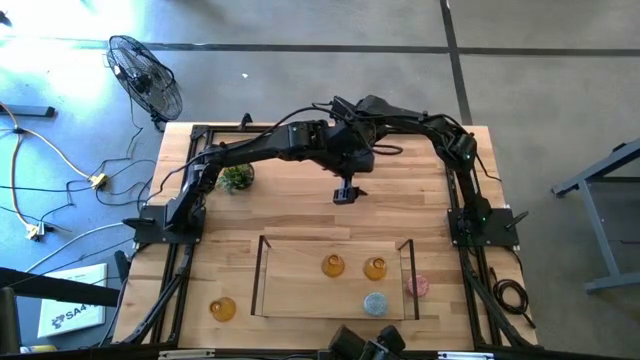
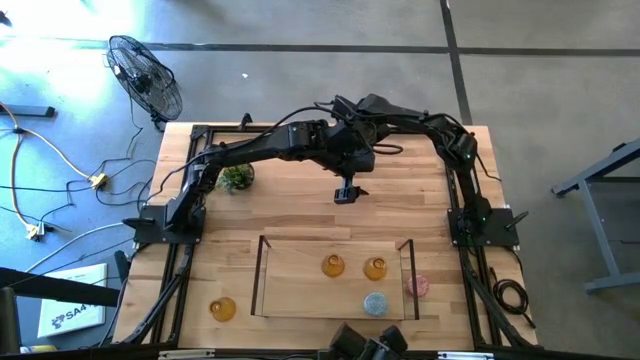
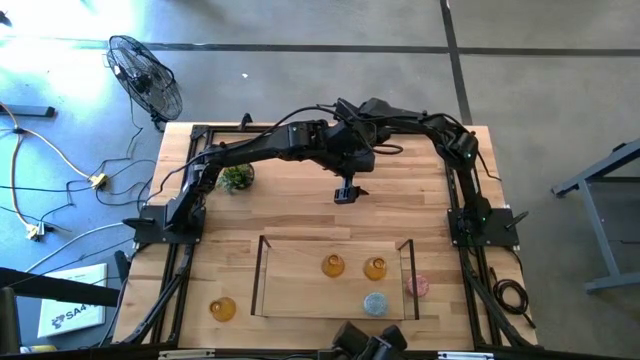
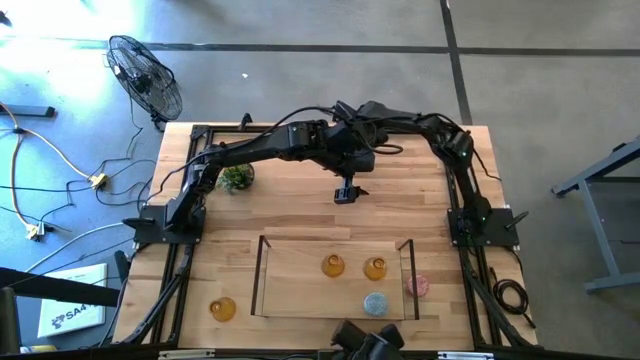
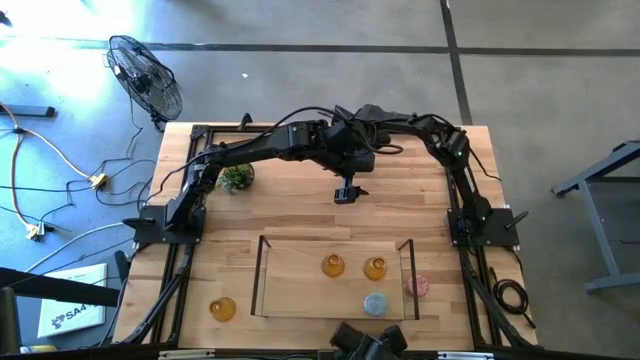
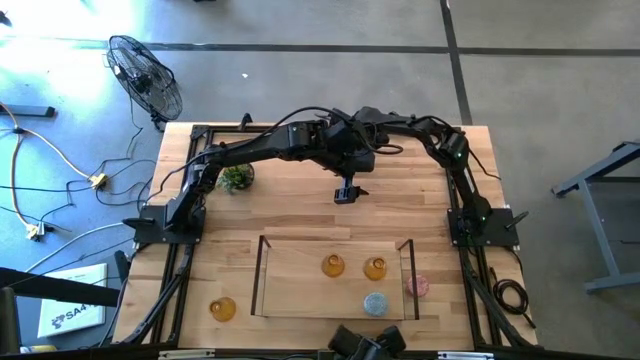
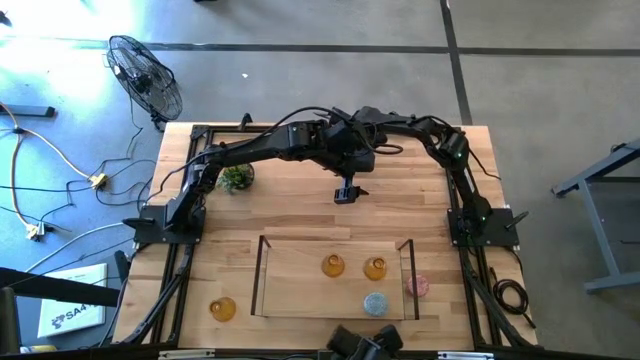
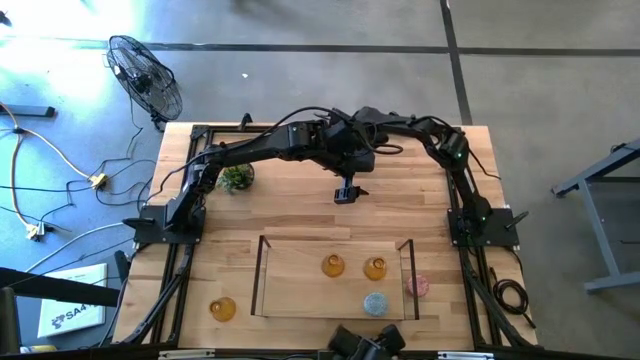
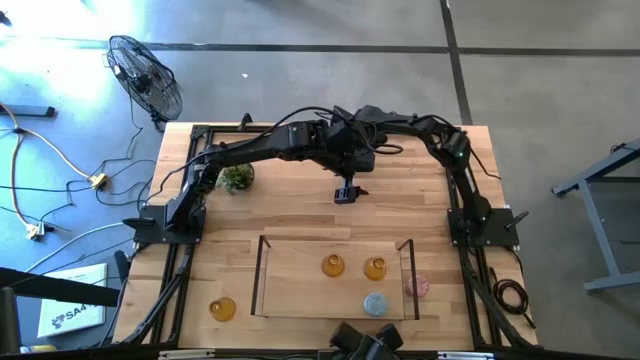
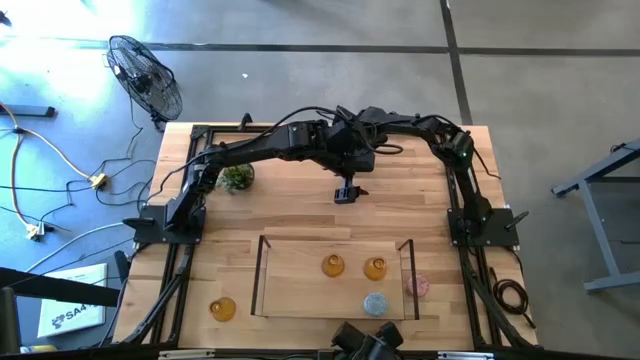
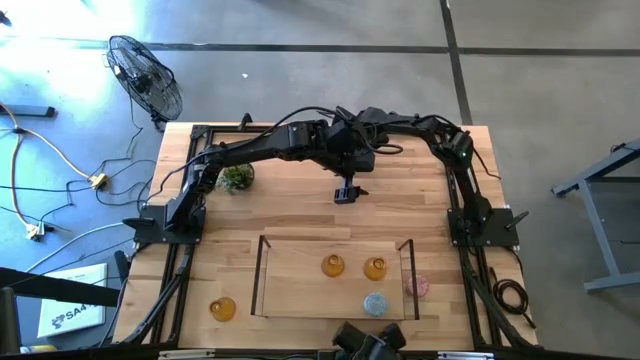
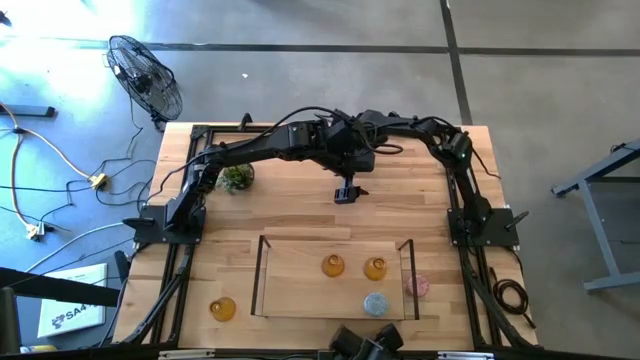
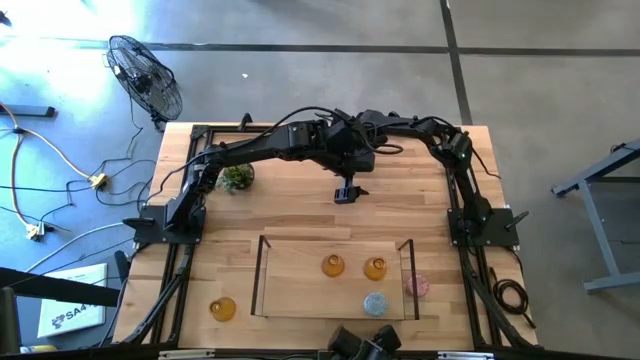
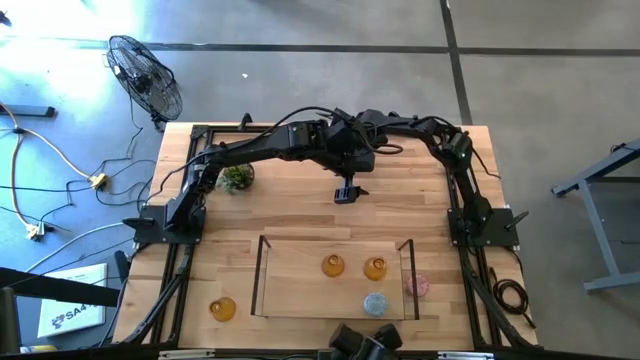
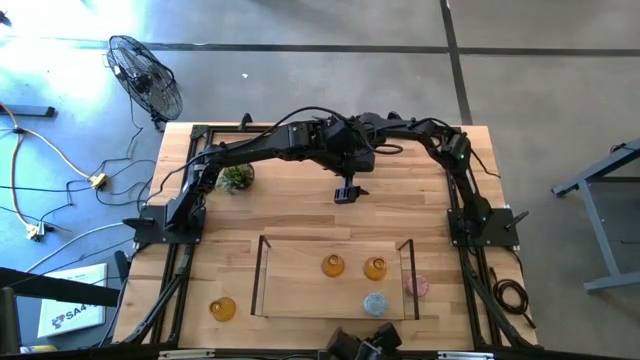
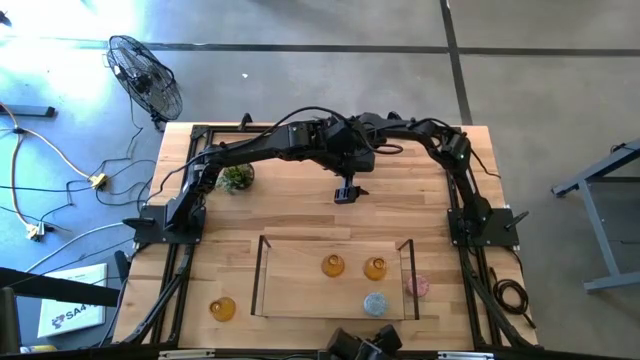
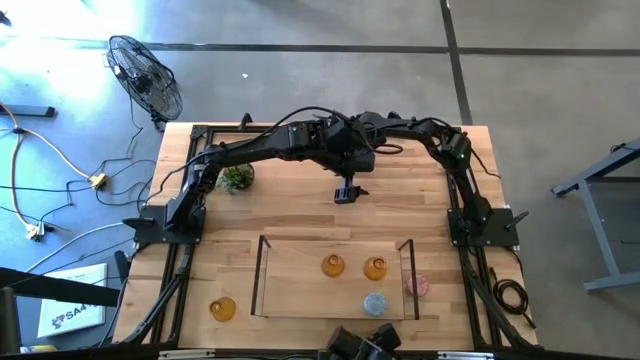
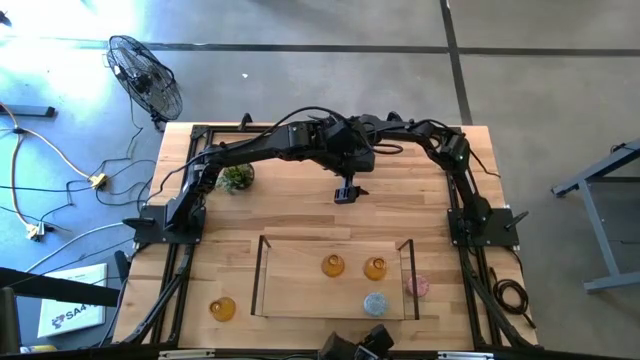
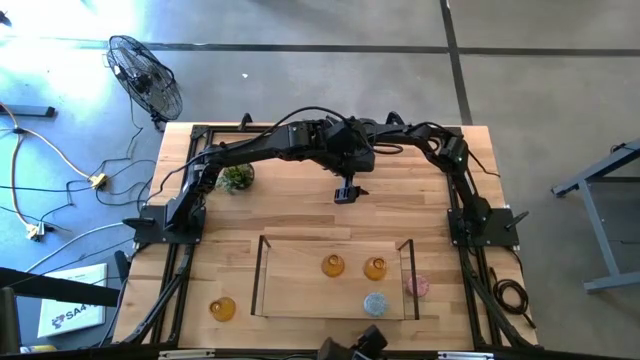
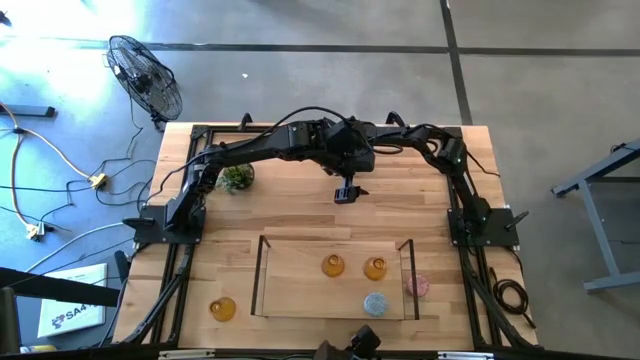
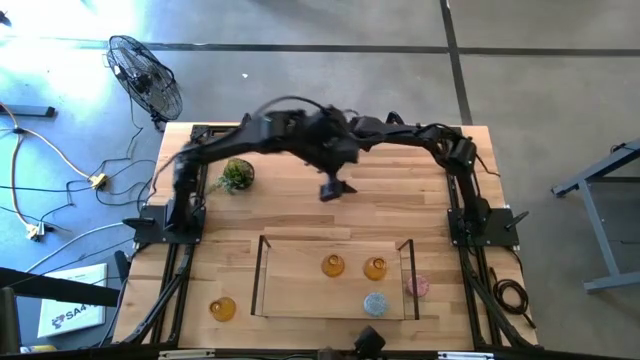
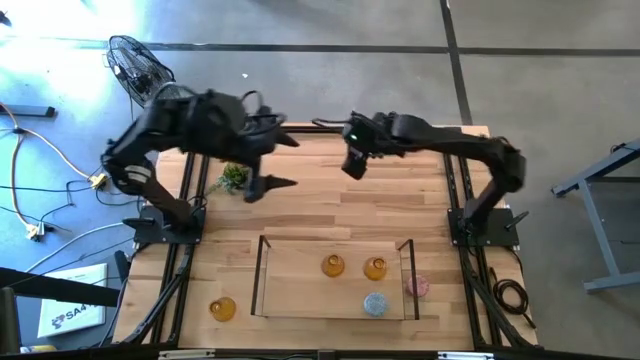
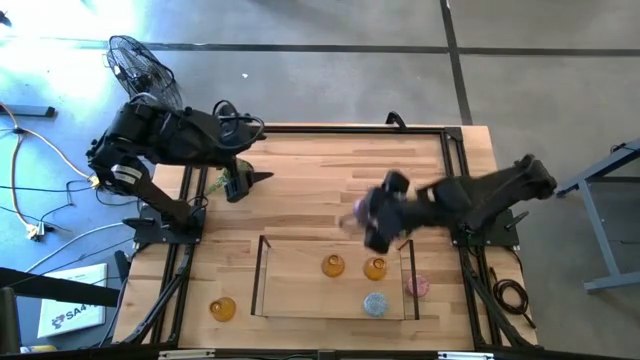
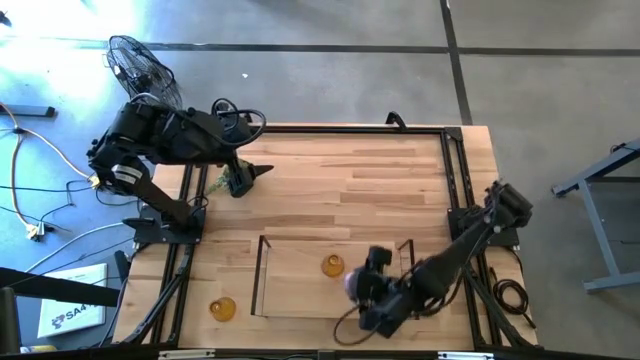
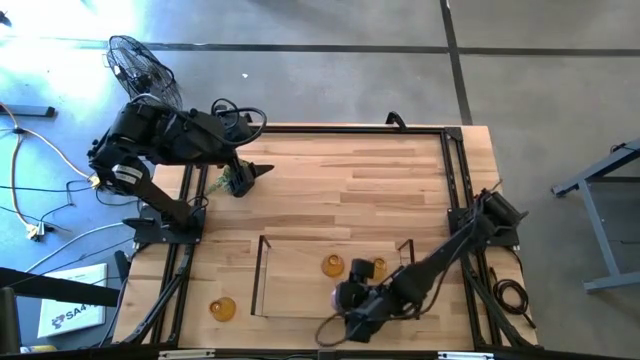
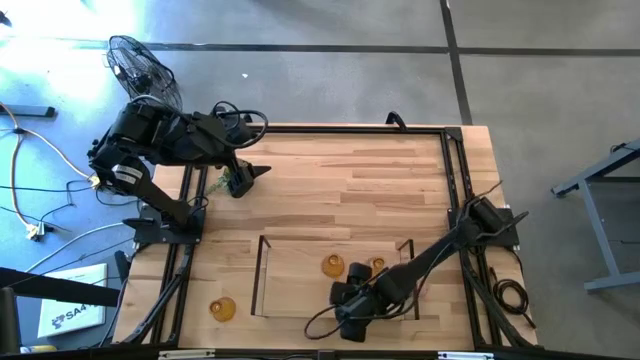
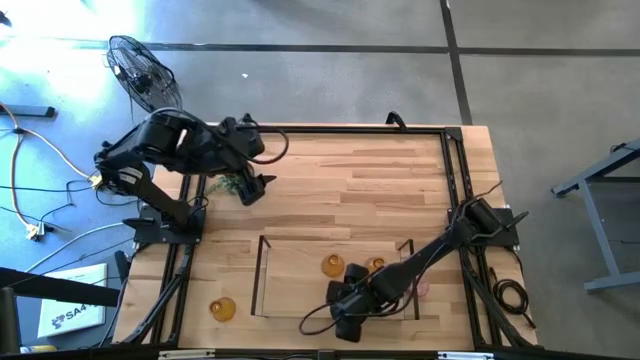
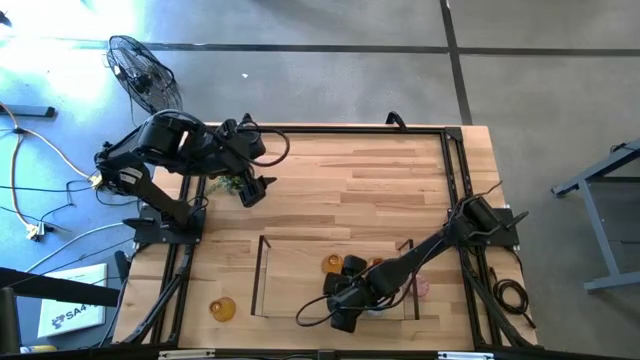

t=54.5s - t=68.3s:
Task: Pick & Place candle stick holders
Put the red patterned scented candle on the shelf

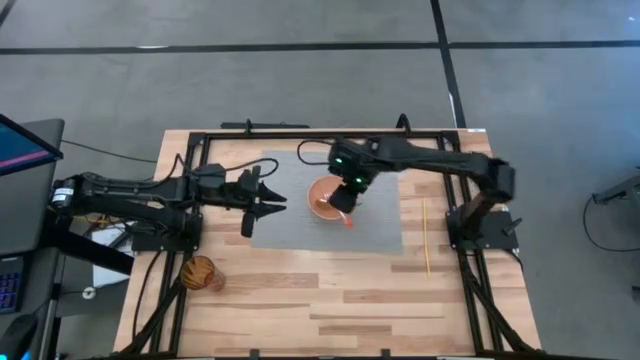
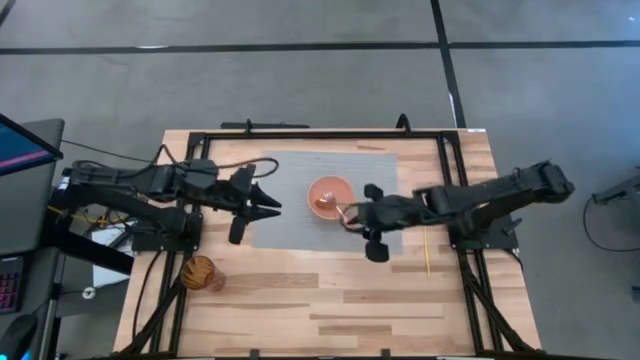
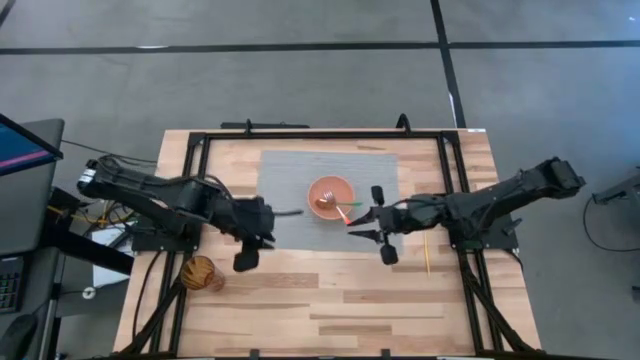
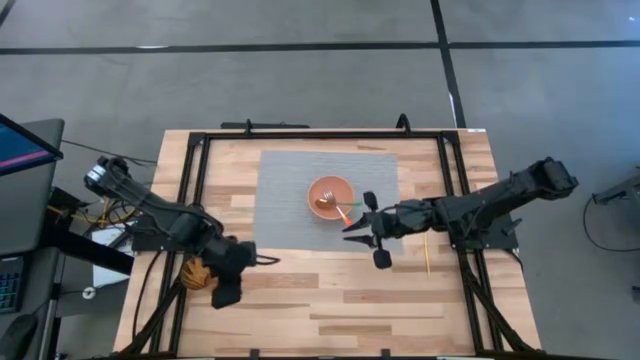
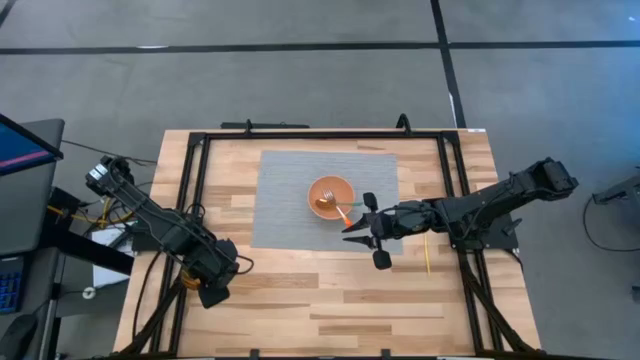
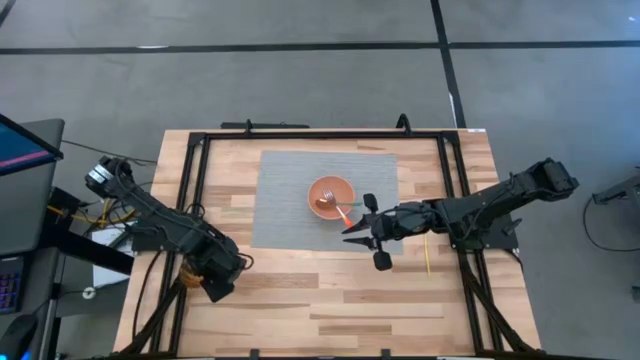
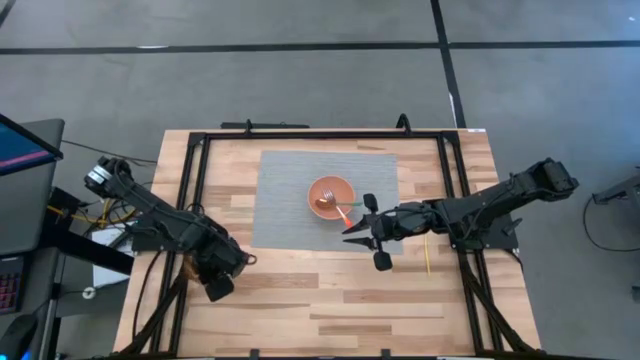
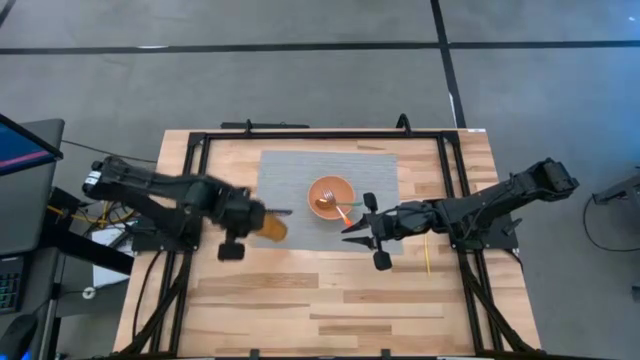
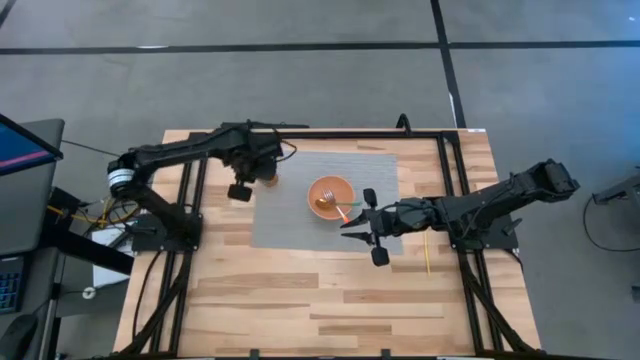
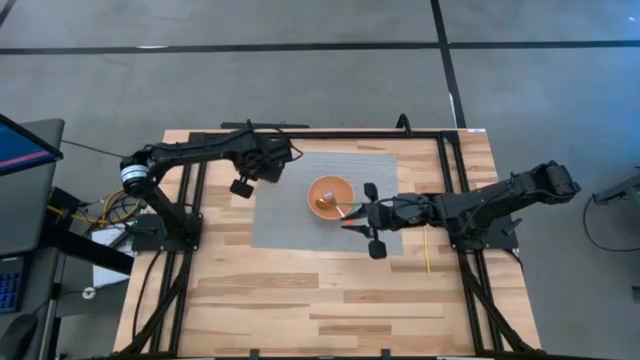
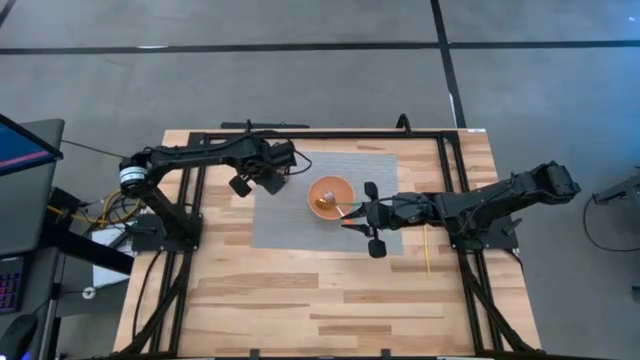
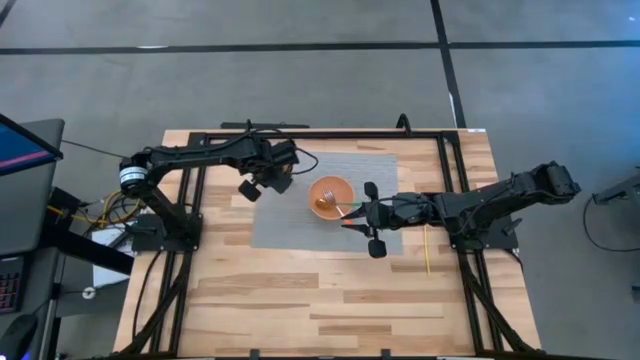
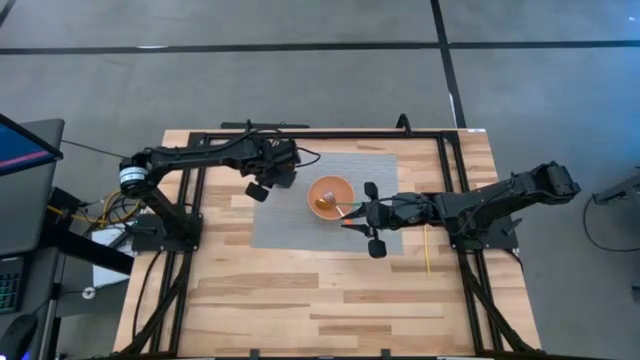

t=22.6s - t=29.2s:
Task: Pick & Place Utensil
Put the brown cup on the gray mat to the top left of the orange bowl
